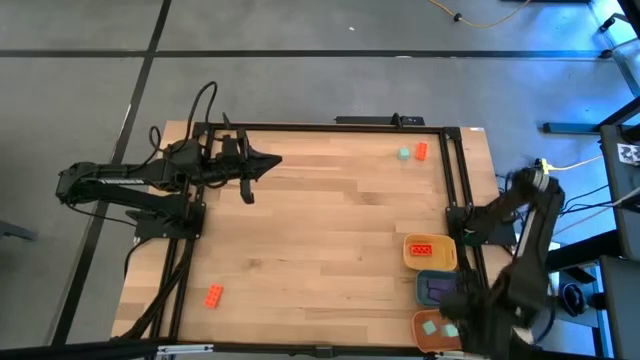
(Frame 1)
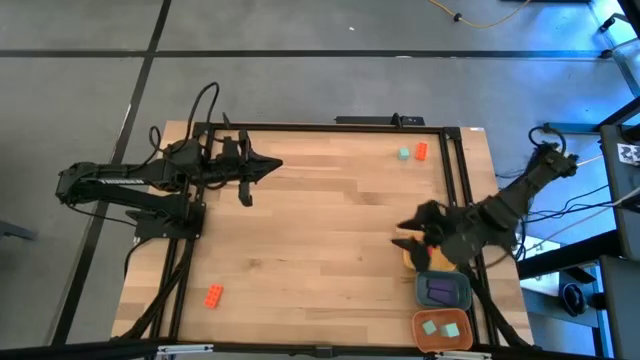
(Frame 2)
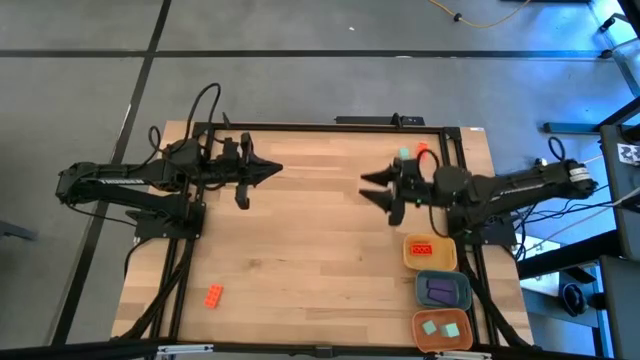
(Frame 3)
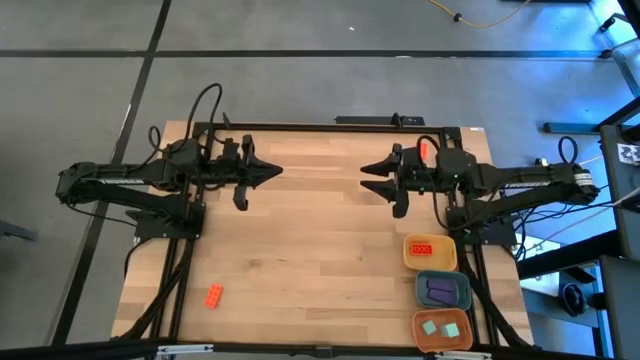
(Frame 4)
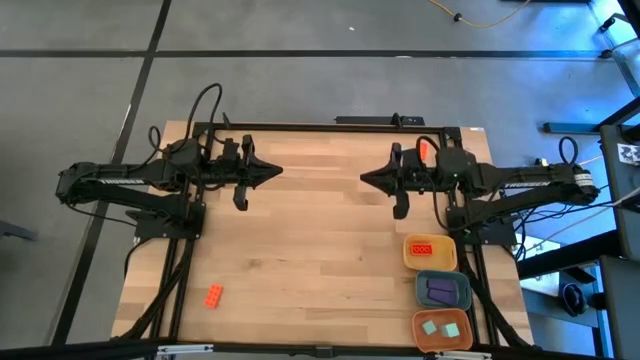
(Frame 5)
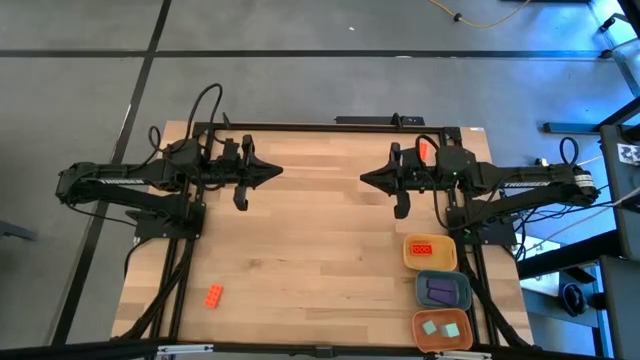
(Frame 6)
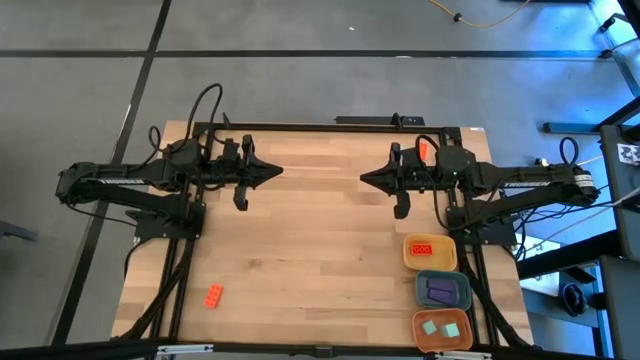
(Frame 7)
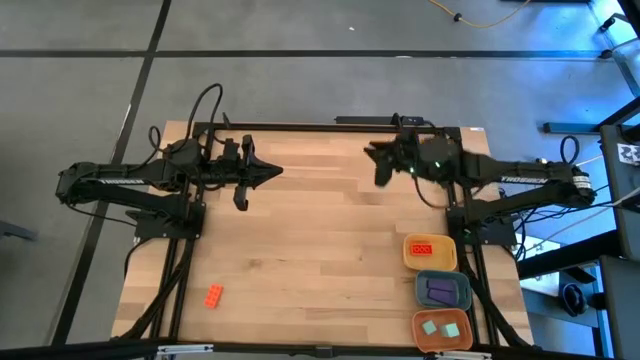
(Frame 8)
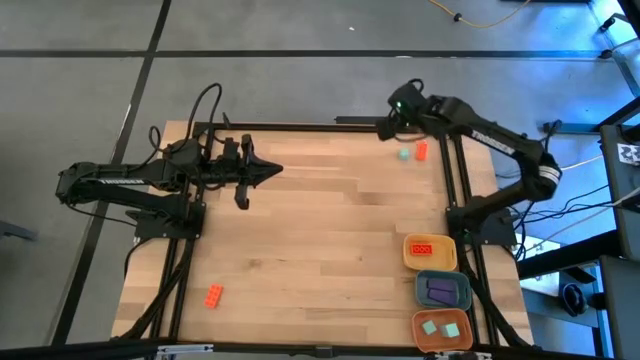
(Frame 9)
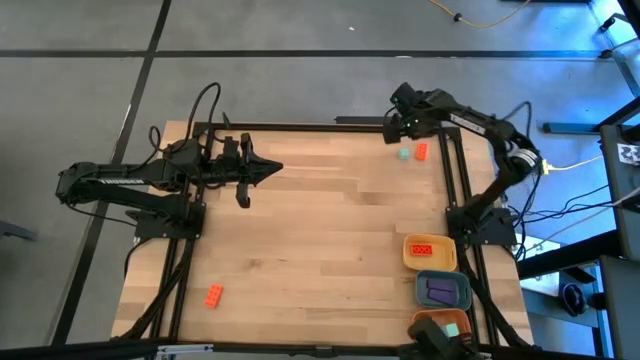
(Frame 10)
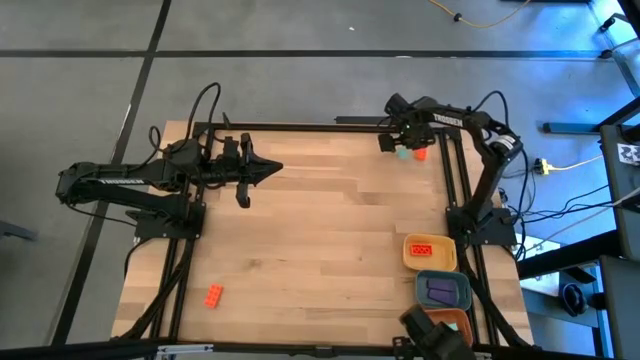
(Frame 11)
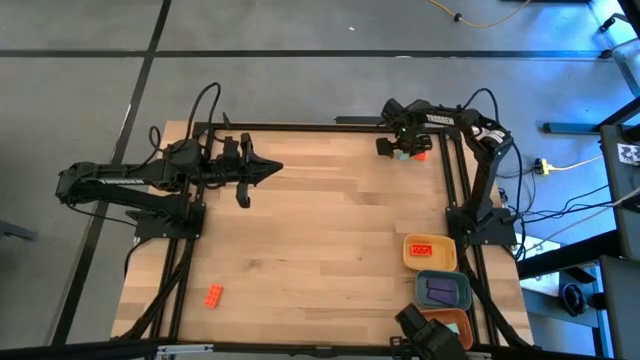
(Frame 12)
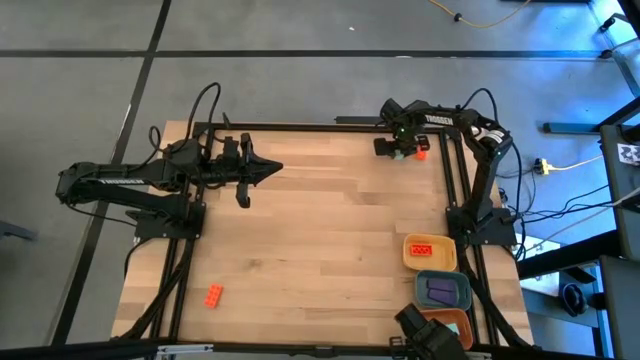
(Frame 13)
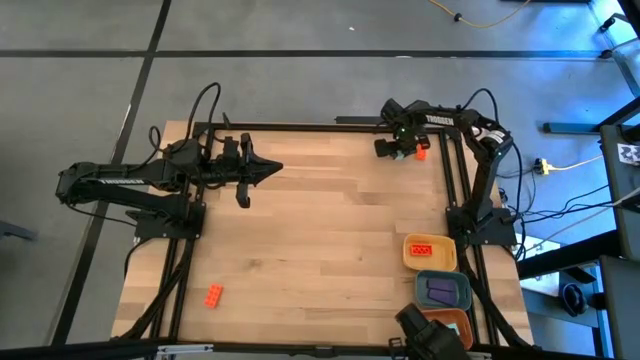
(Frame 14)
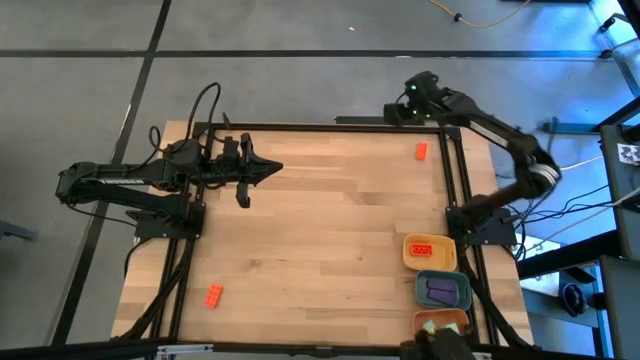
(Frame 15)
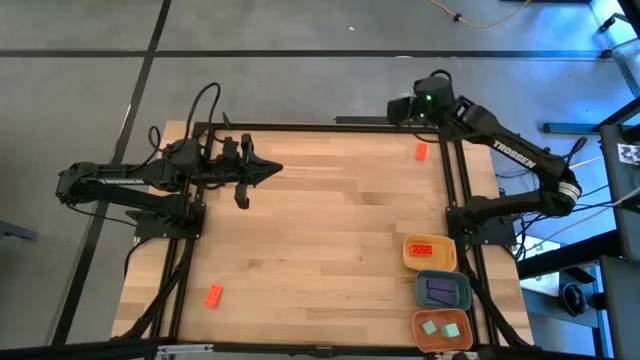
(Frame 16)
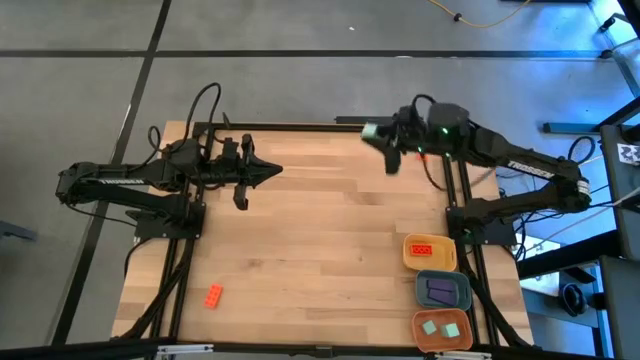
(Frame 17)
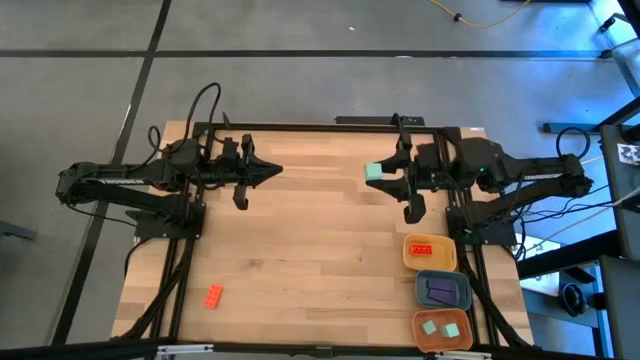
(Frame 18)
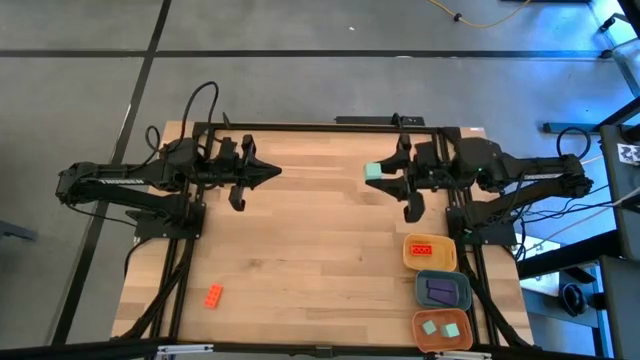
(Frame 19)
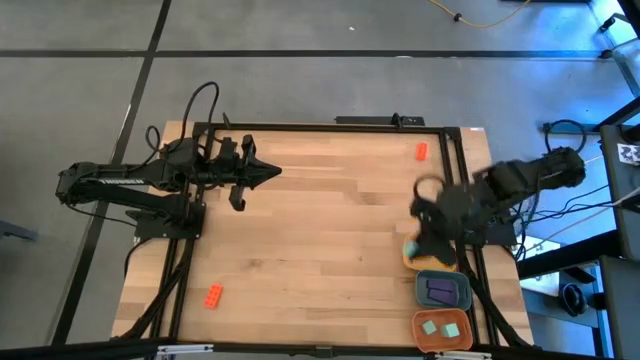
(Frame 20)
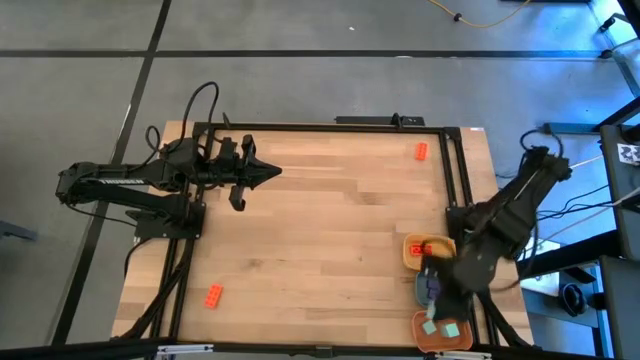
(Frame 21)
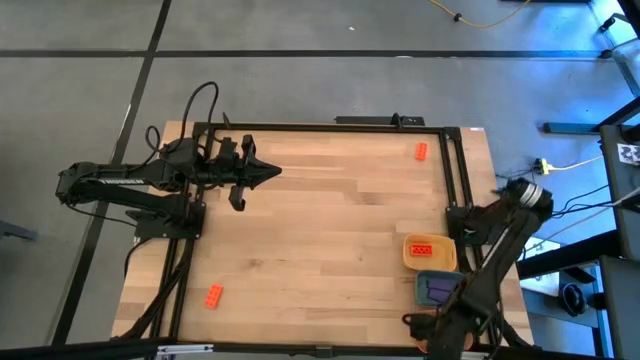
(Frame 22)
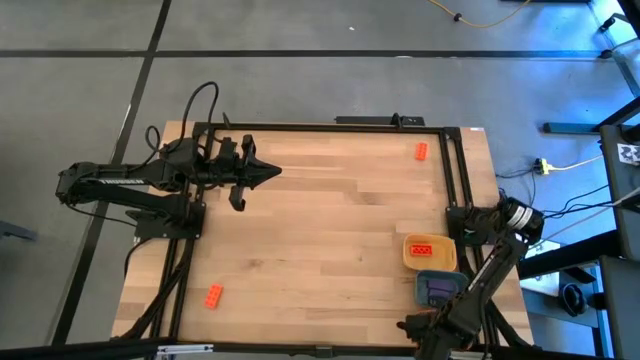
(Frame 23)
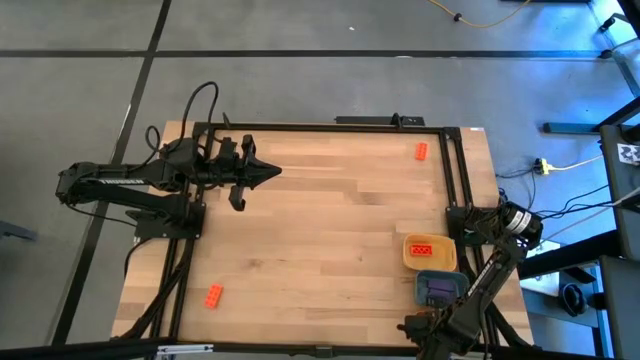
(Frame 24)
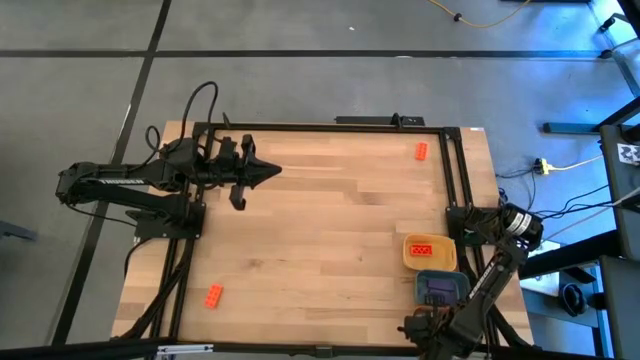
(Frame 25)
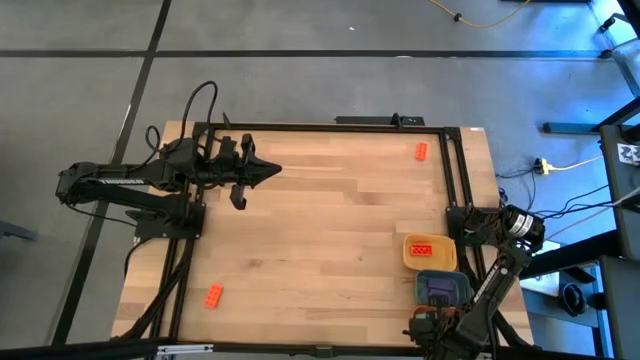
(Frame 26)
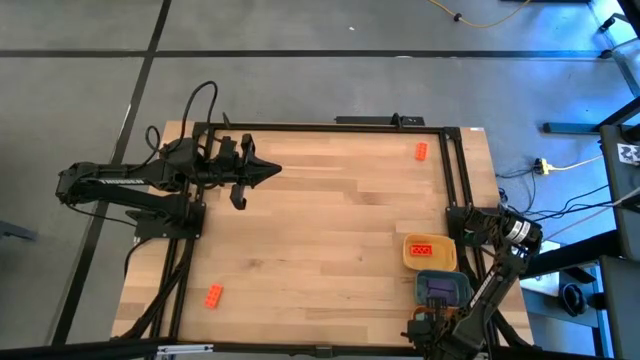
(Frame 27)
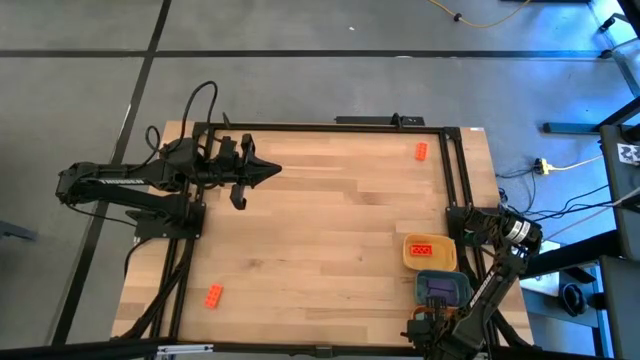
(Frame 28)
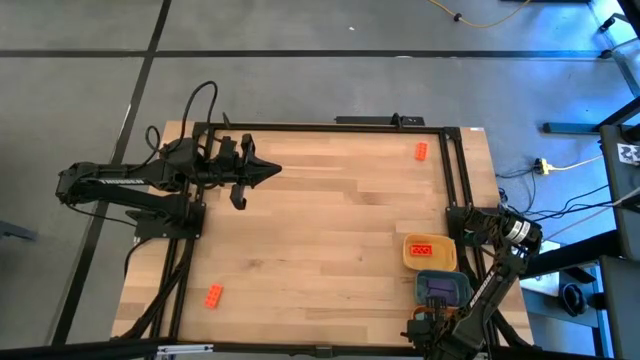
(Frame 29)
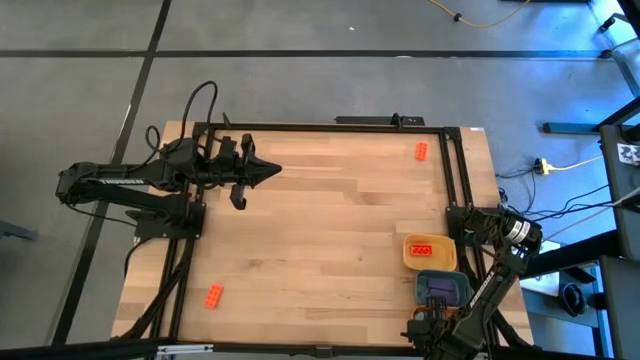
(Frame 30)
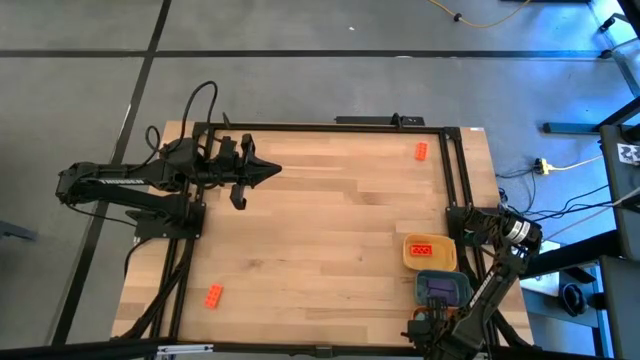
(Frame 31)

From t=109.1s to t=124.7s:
Task: Sort & place blocks by color
Put the light blue block into the orange bin

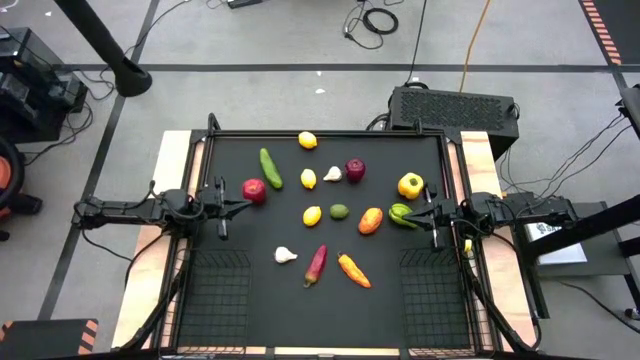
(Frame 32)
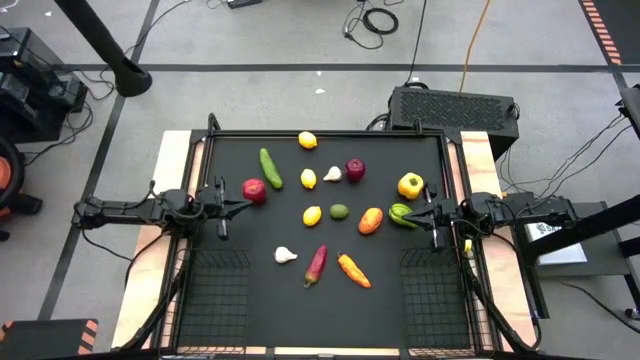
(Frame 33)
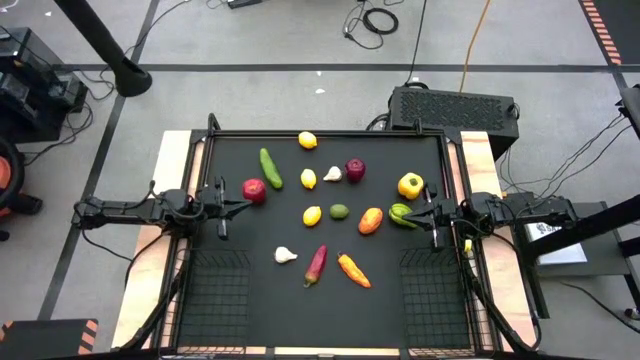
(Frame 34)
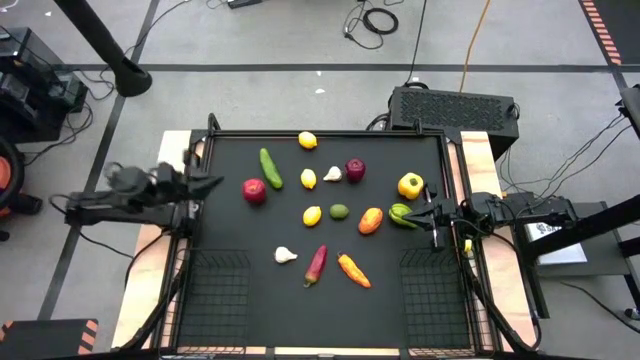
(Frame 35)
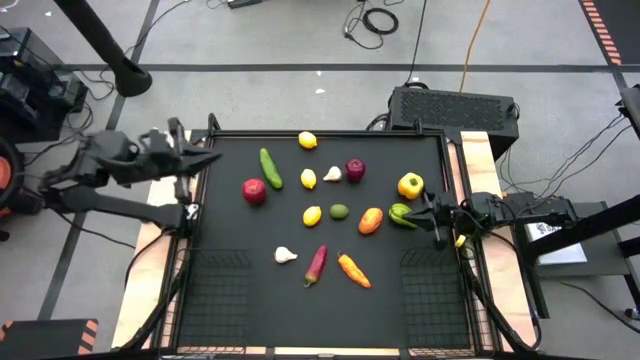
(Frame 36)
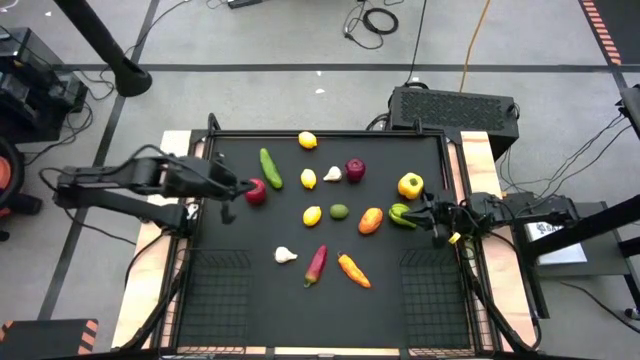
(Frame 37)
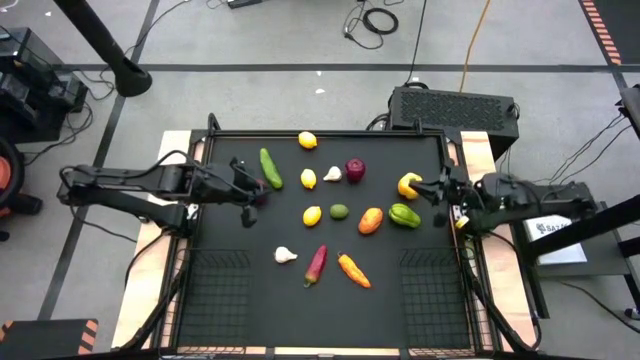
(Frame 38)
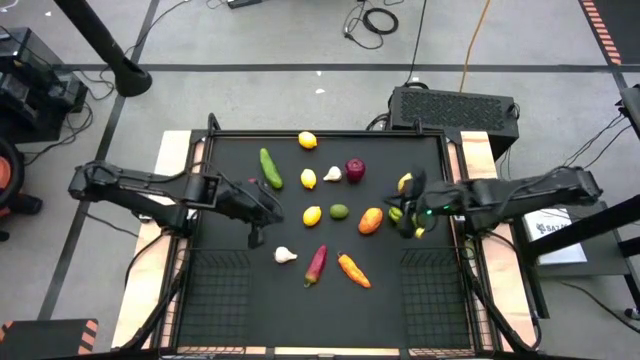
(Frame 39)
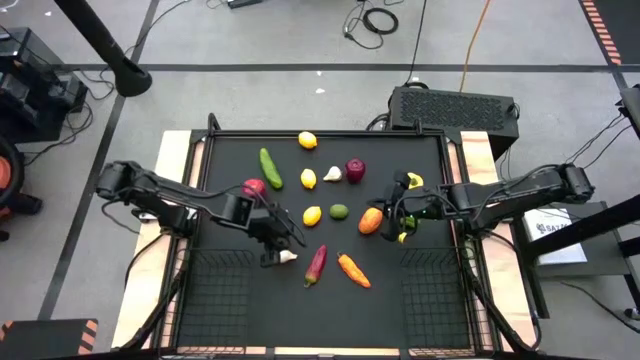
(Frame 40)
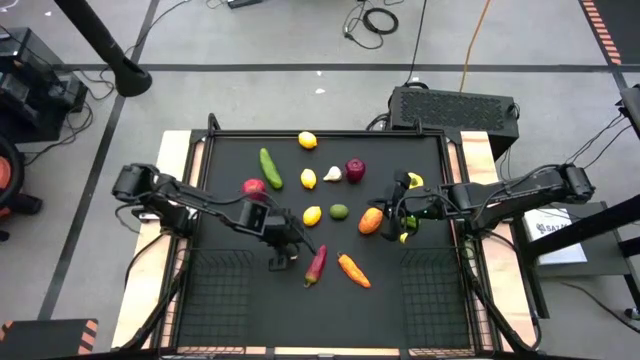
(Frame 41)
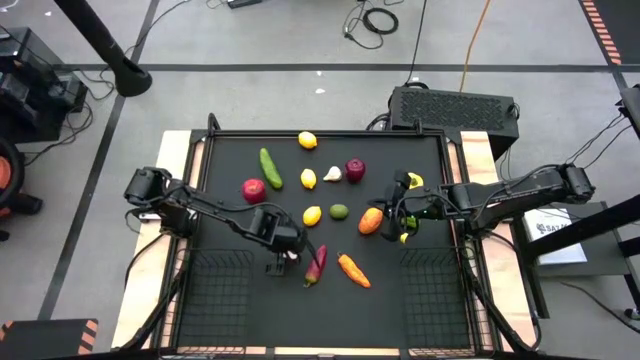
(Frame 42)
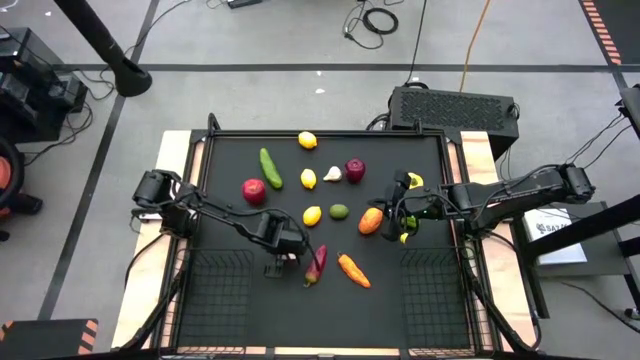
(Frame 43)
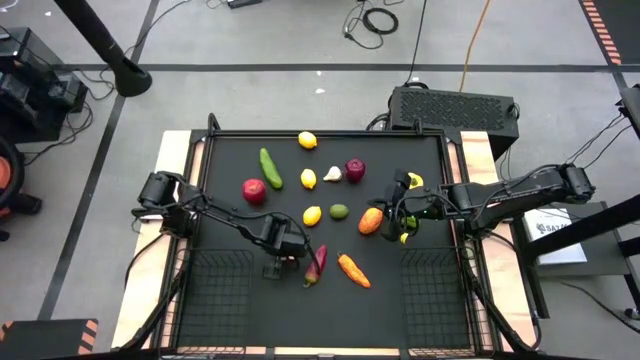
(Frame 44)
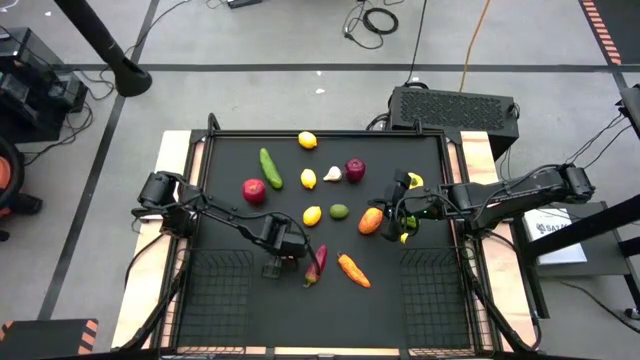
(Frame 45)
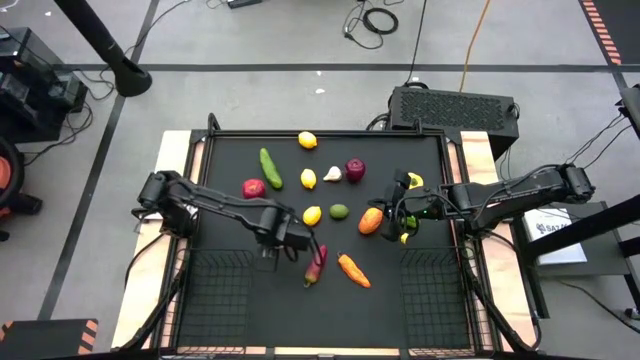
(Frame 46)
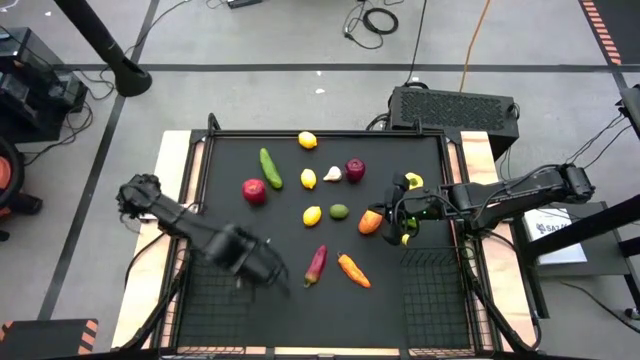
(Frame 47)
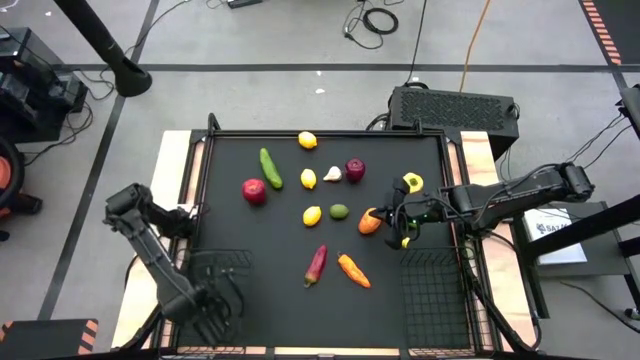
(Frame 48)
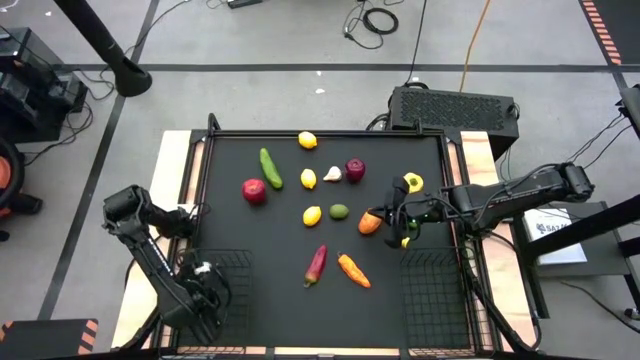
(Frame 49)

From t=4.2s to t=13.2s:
Task: Sort produce into baskets
Put the bottom garlic into the bottom left basket
